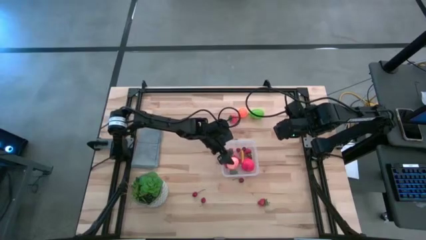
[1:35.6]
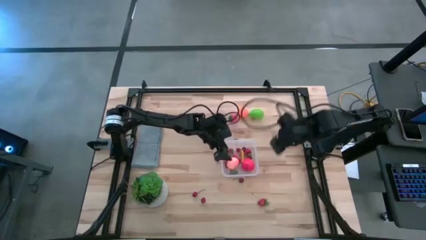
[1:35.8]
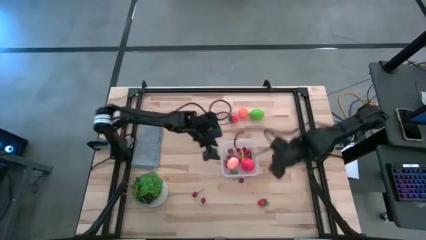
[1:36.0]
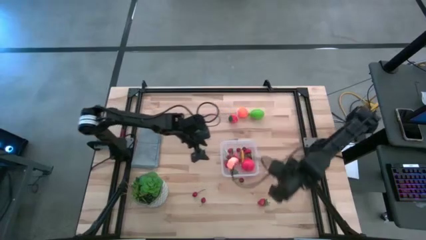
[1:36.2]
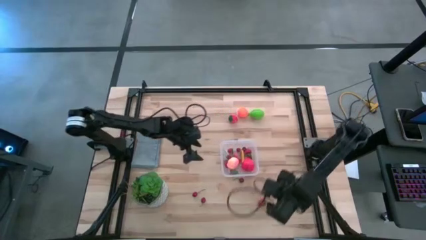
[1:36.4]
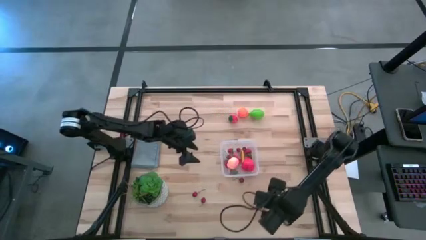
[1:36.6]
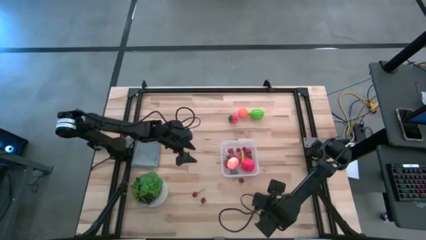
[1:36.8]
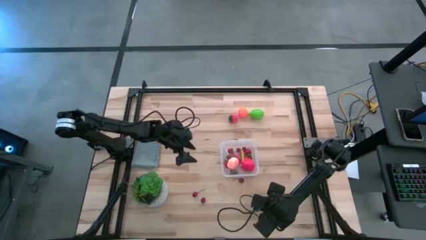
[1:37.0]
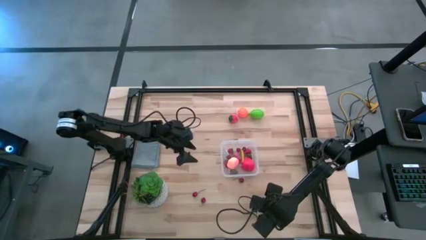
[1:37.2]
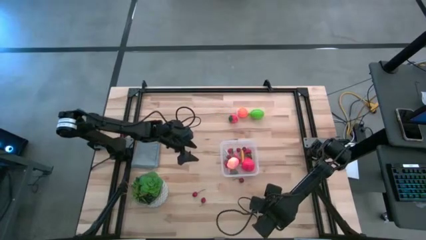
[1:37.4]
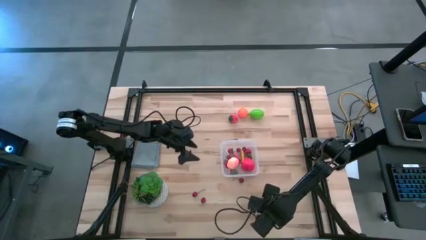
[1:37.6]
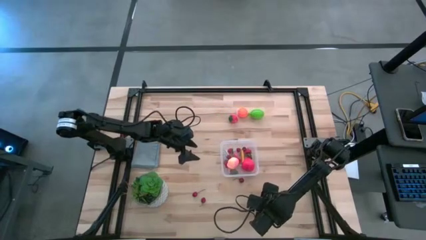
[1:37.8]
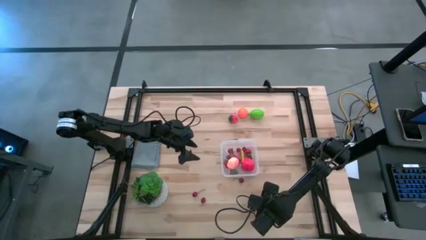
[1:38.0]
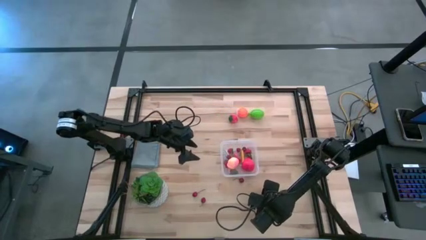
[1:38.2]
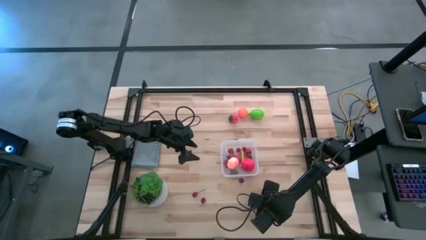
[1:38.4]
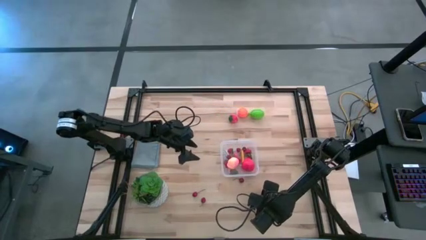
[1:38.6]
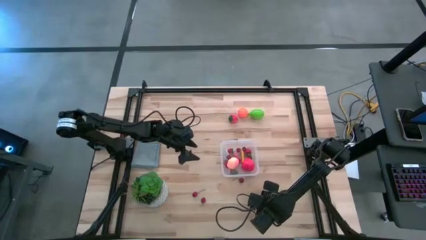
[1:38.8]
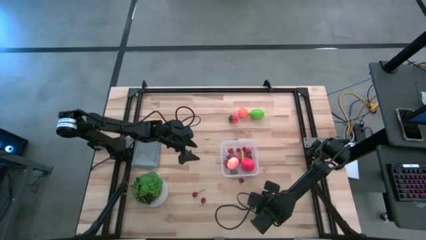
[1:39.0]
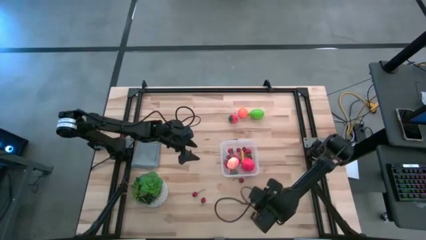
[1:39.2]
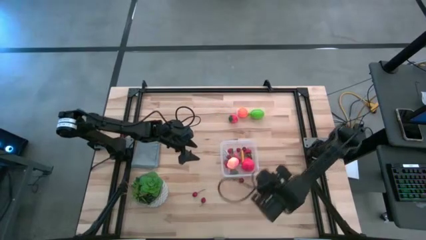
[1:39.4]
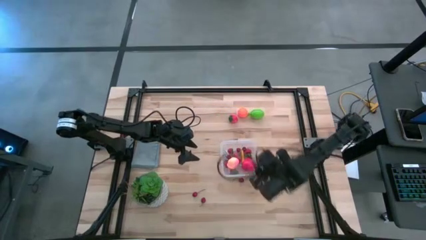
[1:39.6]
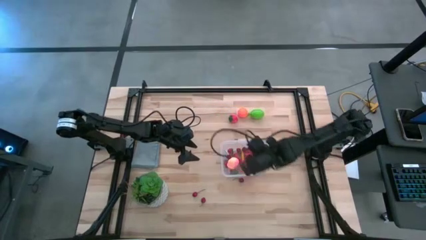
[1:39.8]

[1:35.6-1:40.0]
Task: Pick and placing Produce into tupperware
Put the bottom strawberry into the transparent bin

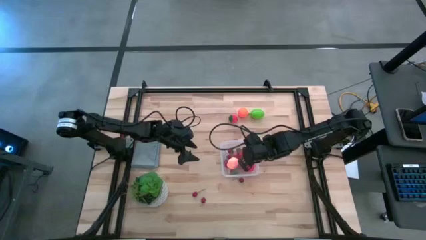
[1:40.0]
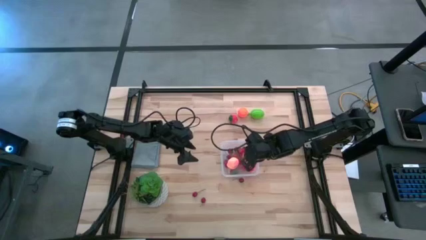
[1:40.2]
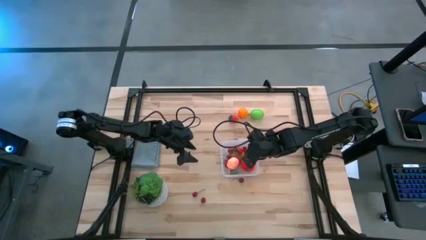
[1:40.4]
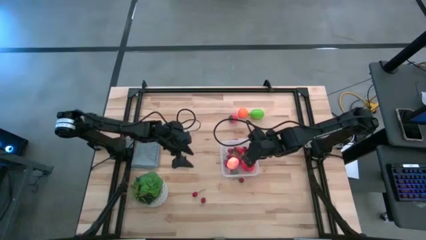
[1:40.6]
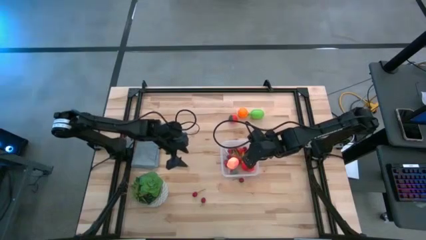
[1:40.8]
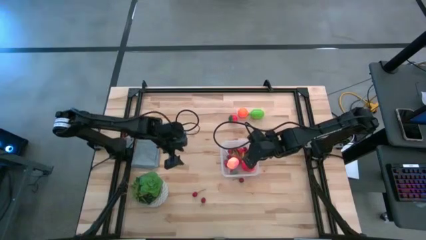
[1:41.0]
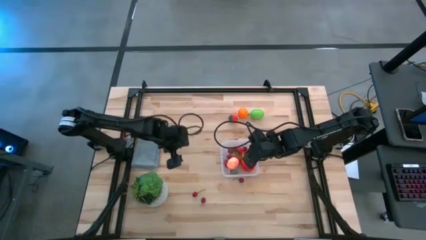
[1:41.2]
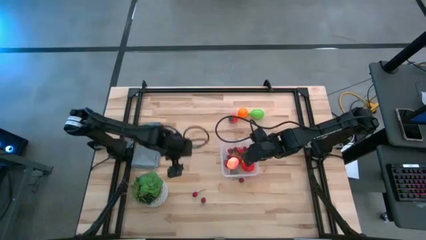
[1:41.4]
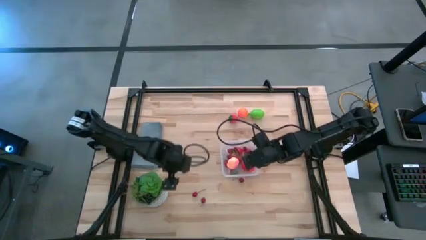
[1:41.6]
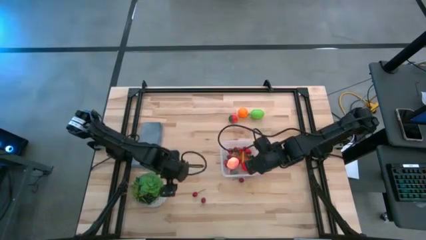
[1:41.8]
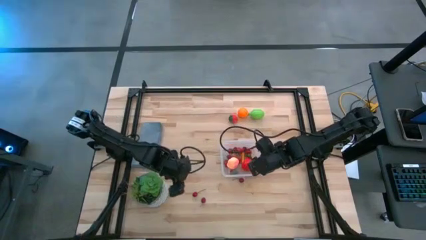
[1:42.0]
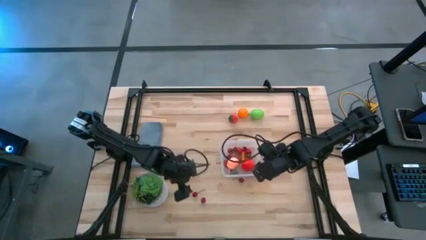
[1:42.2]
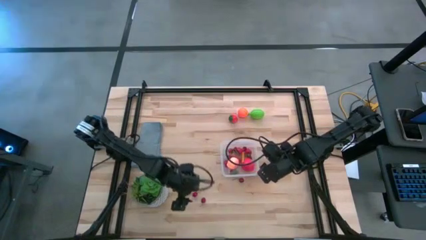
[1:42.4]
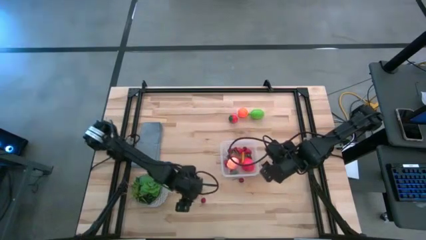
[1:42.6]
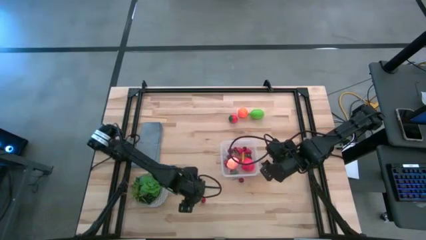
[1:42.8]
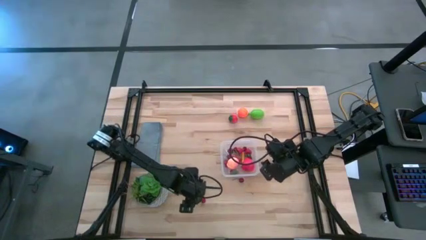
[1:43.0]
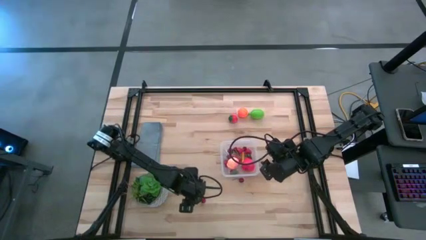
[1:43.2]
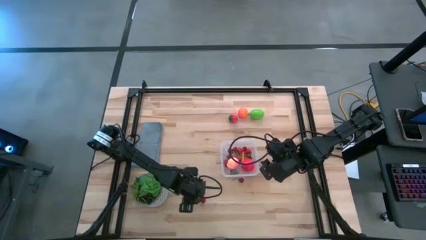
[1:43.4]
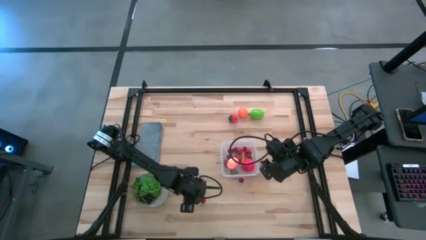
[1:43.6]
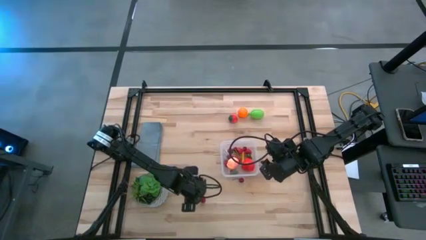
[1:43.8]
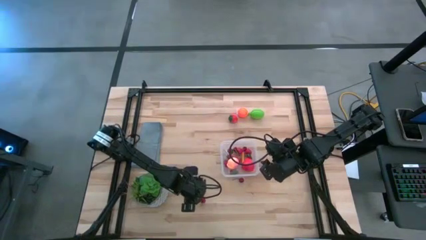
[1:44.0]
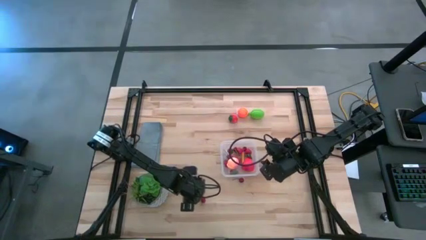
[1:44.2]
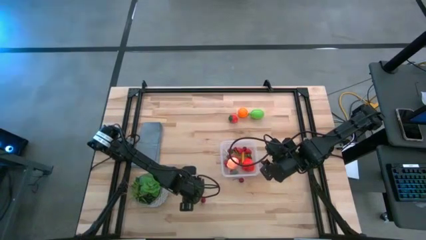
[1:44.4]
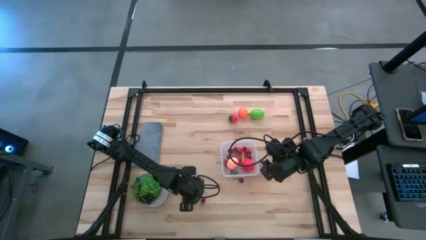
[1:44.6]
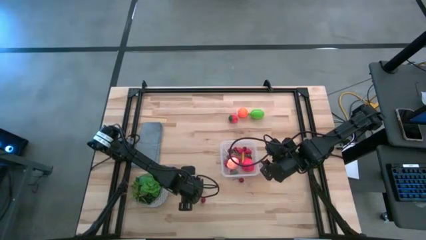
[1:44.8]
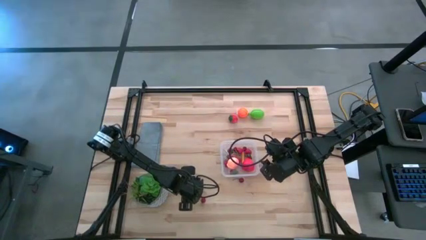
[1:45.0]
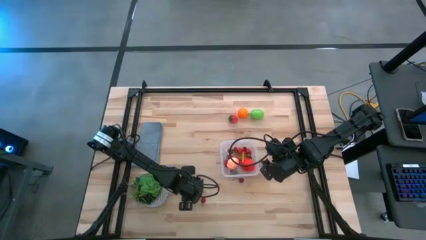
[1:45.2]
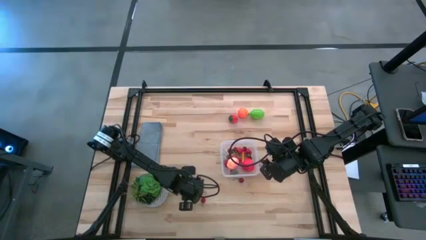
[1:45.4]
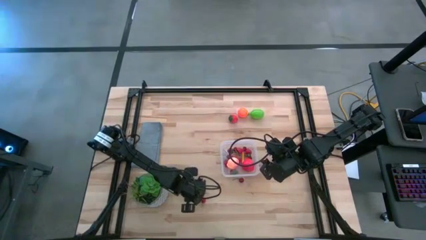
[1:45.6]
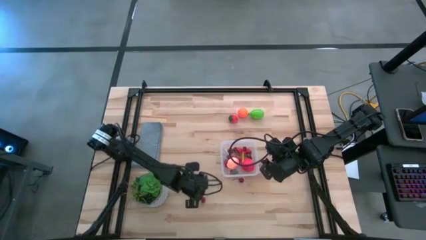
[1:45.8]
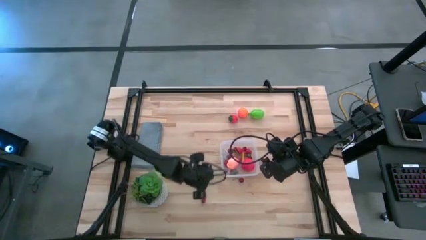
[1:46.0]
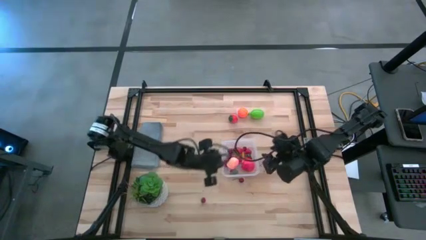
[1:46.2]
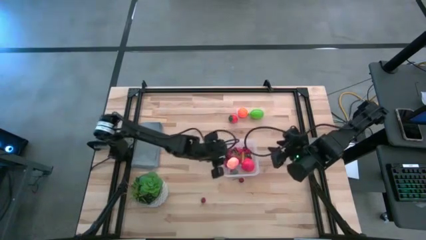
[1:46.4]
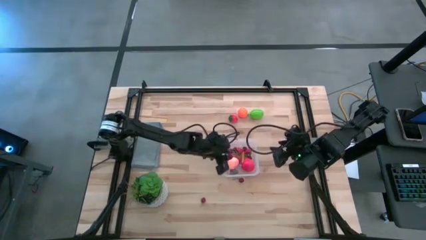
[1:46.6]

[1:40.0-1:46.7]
Put the top left cherry into the transparent bin

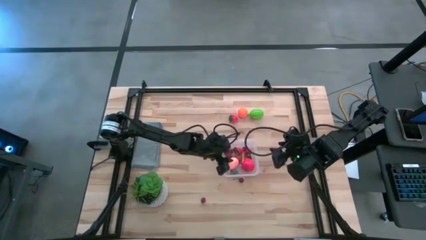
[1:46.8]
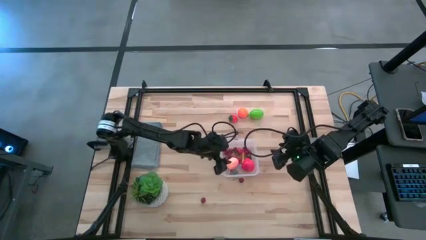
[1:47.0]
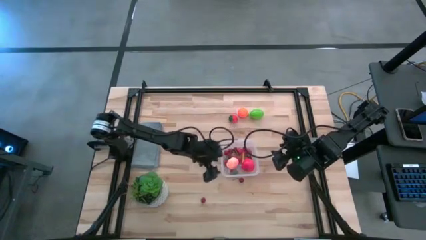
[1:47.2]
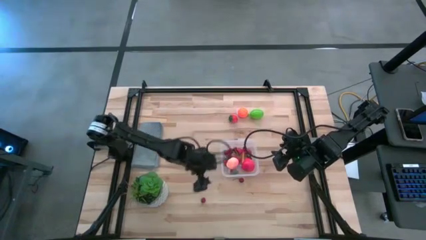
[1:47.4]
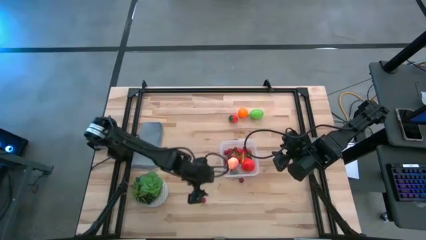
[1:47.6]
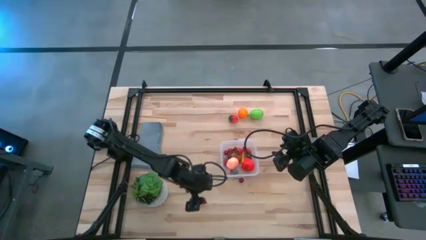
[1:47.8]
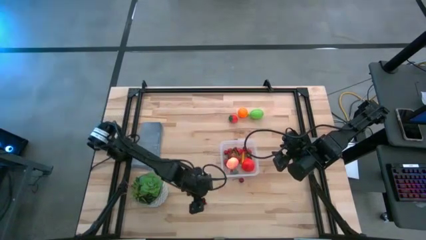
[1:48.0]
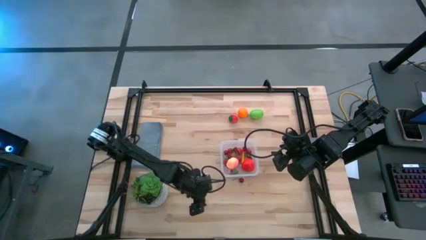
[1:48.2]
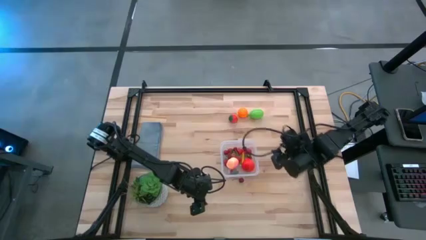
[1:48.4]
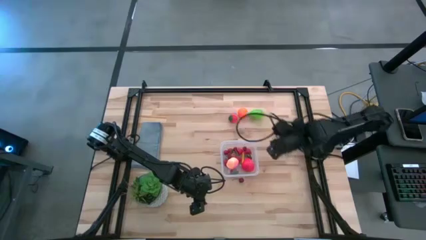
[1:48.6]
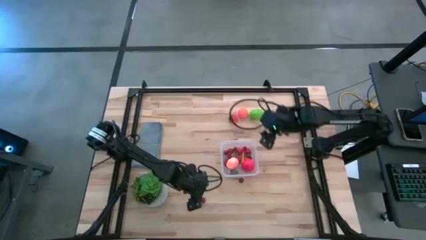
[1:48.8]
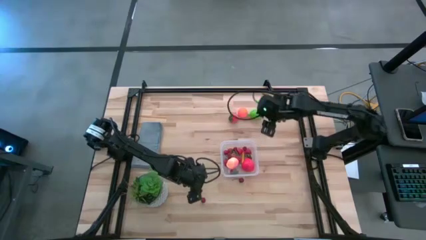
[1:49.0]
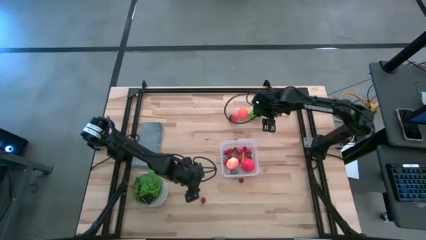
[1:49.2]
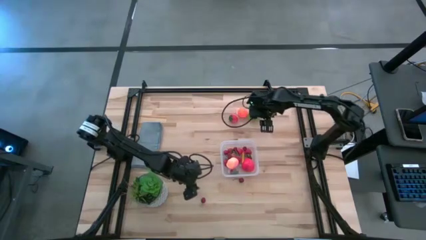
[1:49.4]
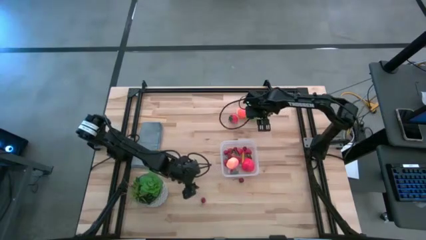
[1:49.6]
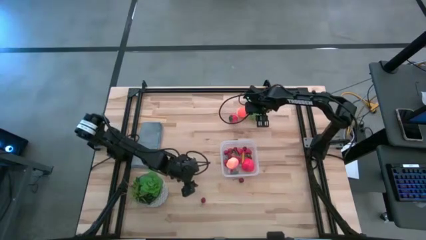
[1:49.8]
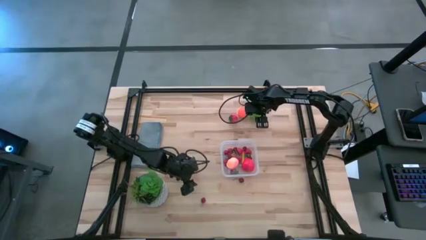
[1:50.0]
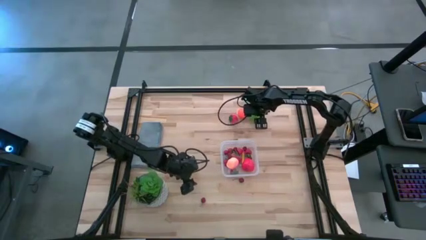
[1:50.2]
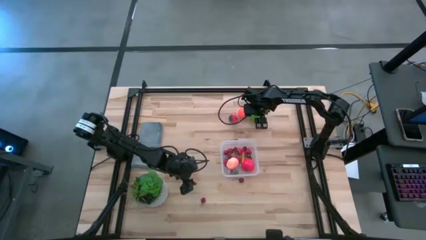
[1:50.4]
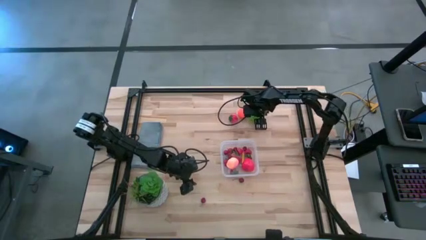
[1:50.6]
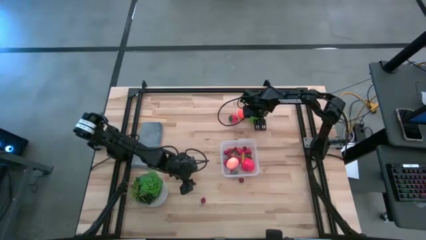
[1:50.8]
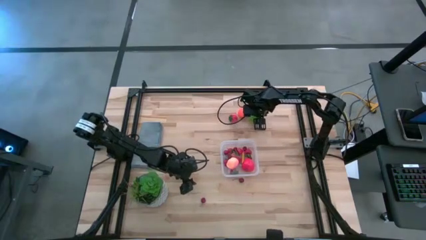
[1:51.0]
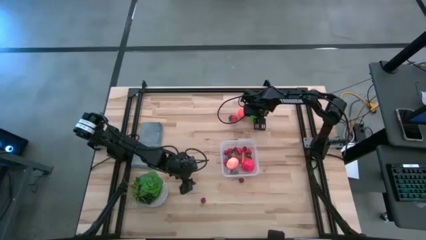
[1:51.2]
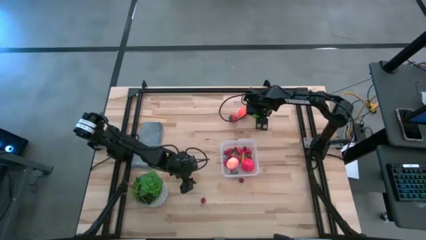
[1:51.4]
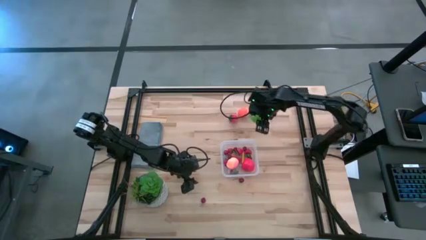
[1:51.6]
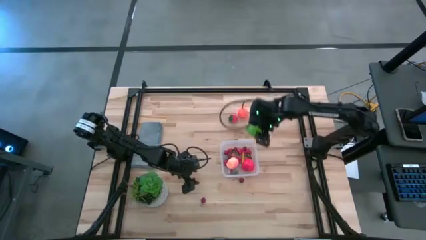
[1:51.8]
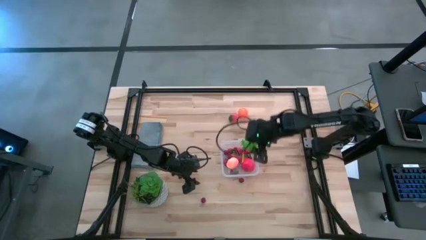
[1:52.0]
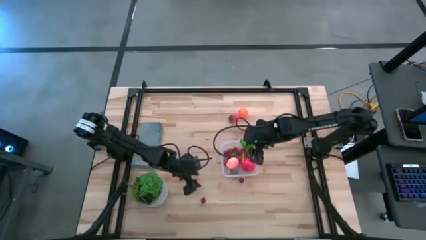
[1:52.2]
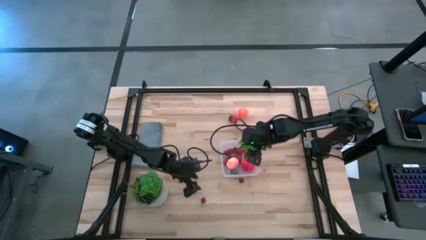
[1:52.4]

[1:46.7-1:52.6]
Put the melon into the transparent bin
